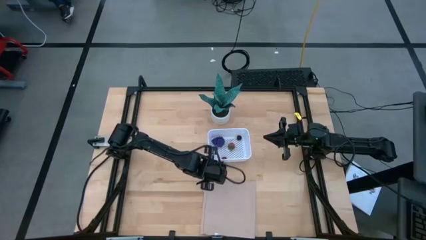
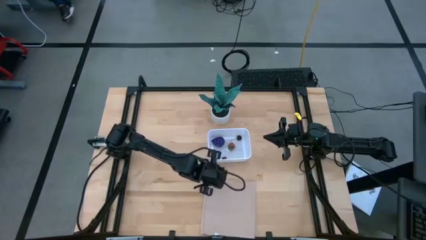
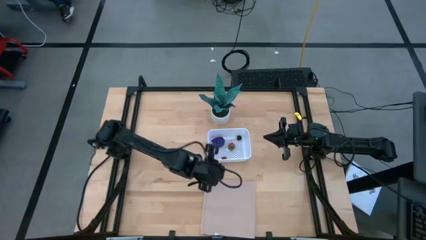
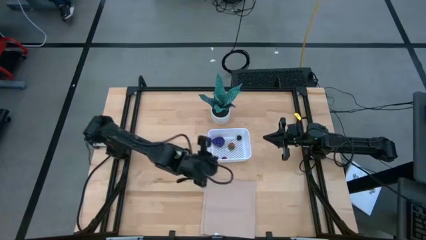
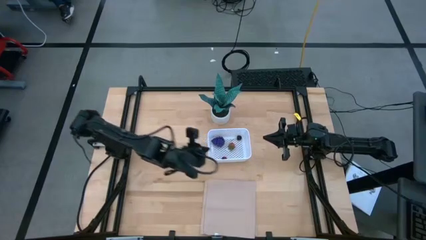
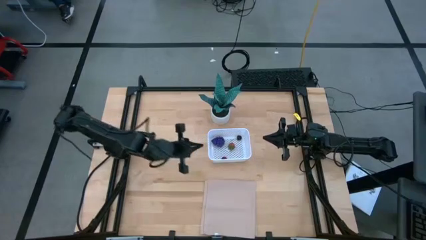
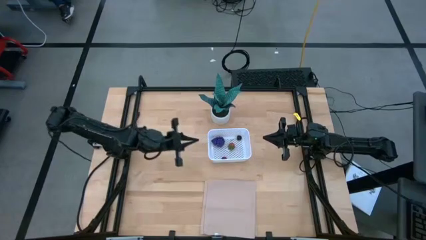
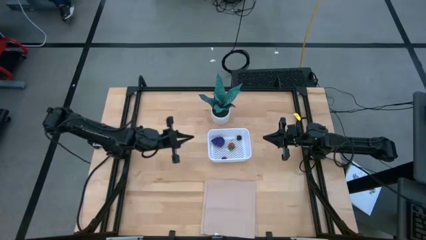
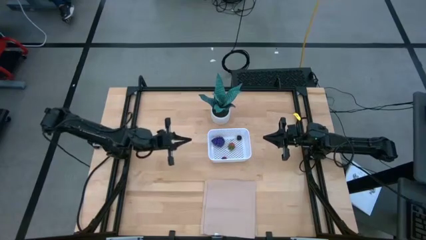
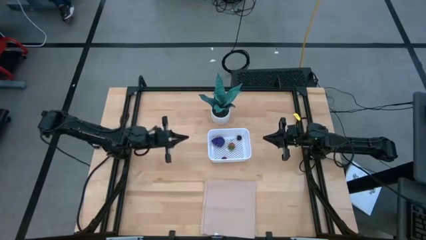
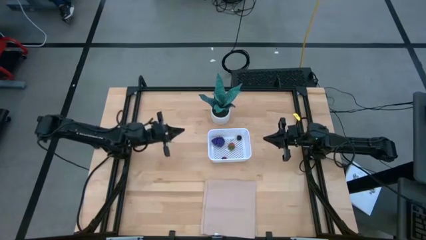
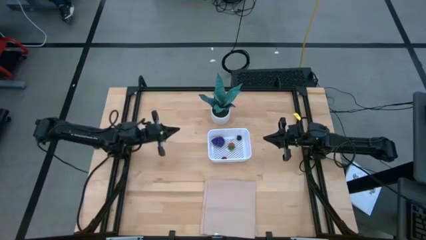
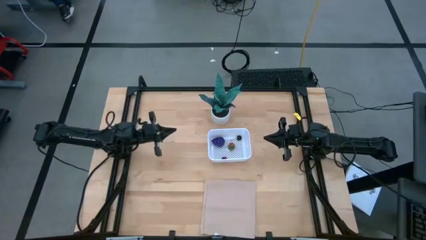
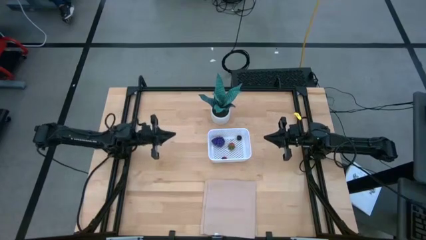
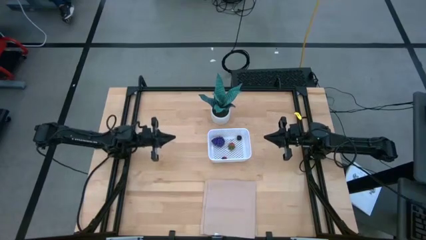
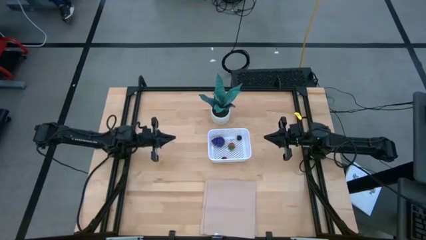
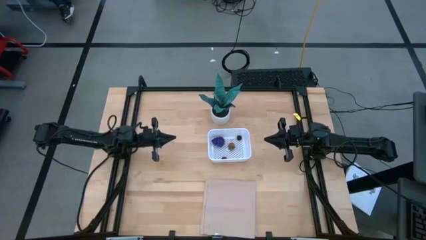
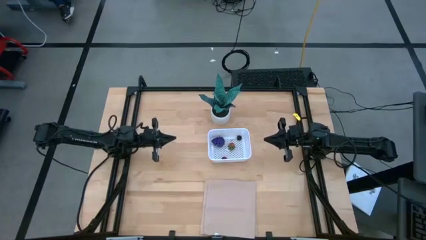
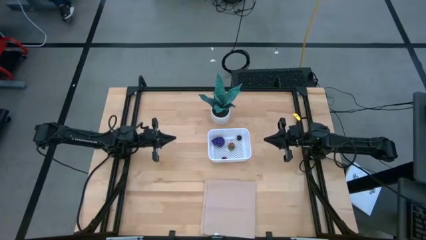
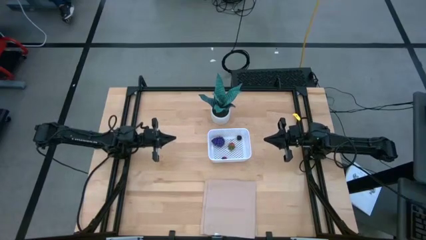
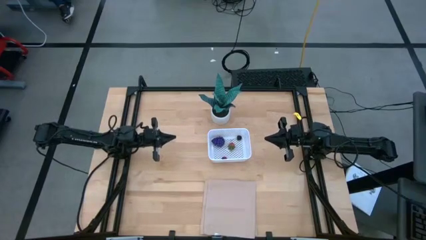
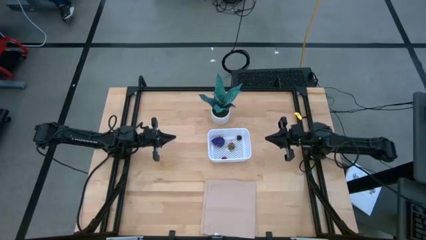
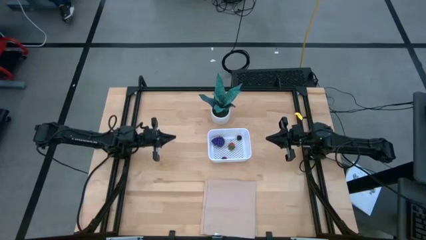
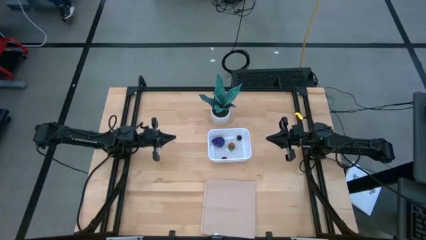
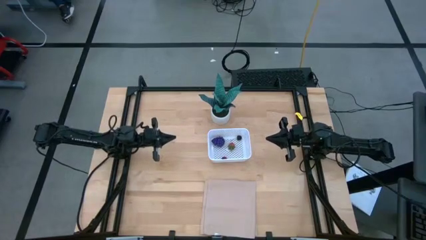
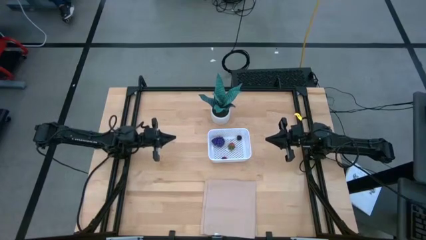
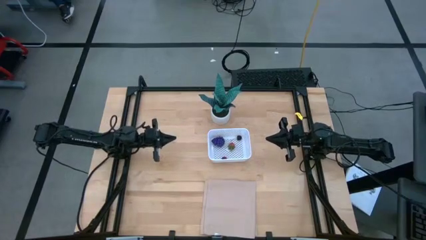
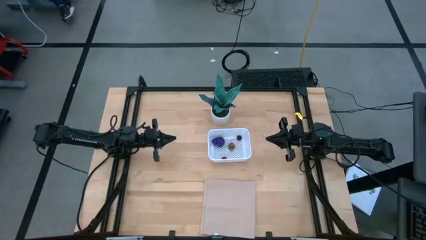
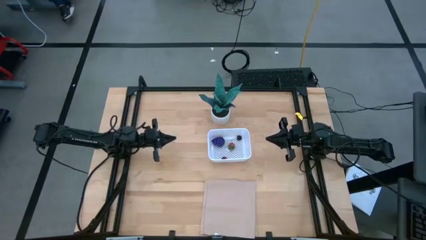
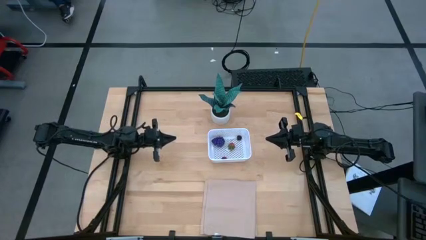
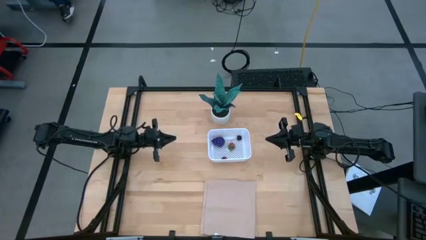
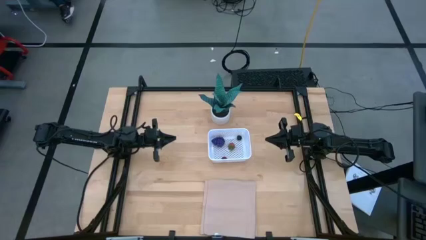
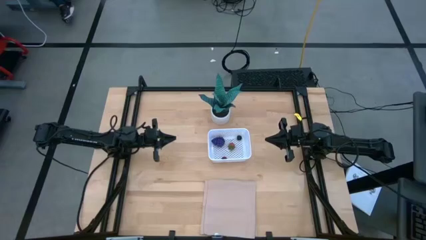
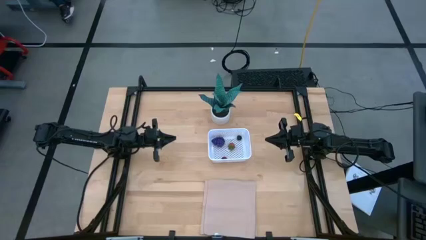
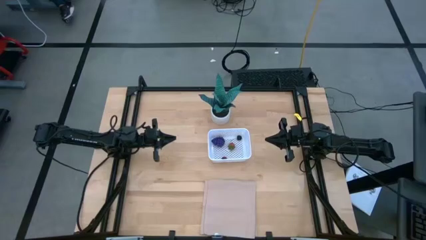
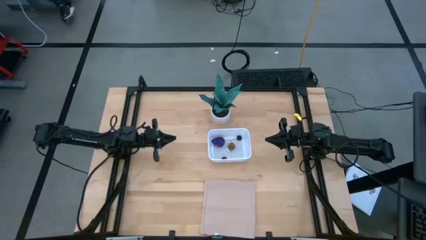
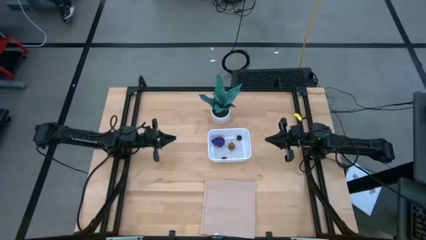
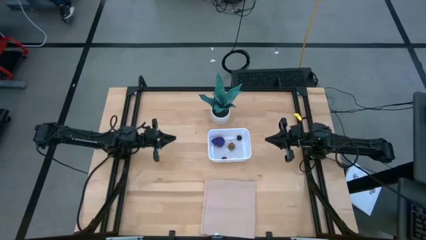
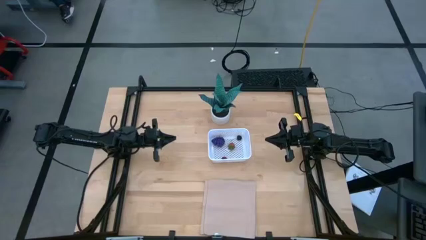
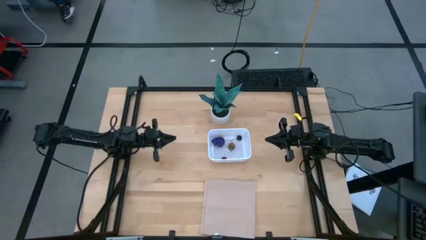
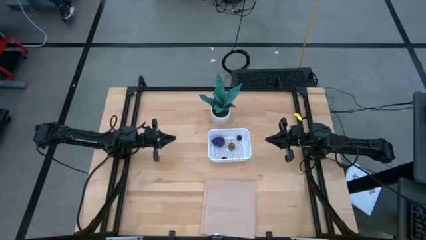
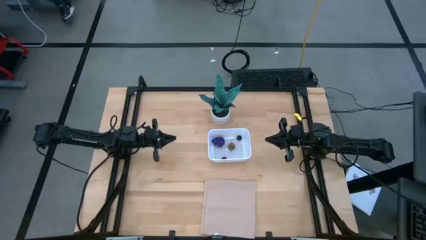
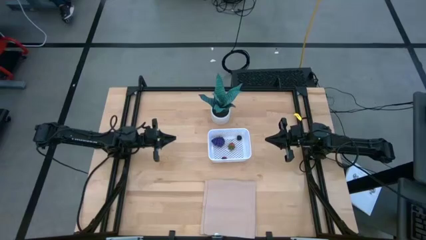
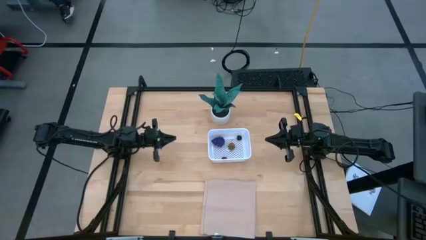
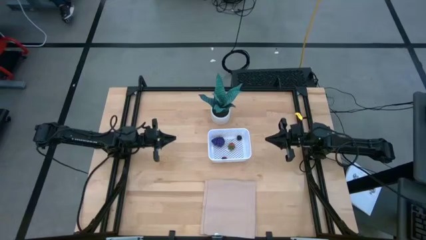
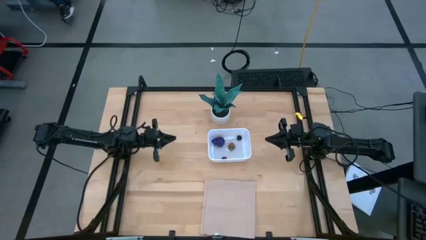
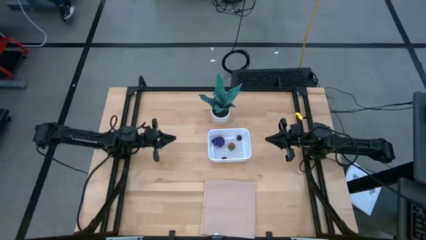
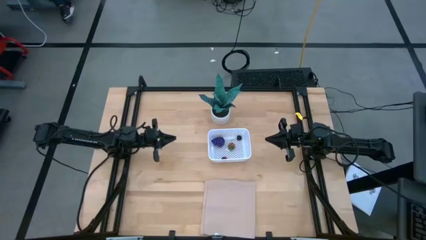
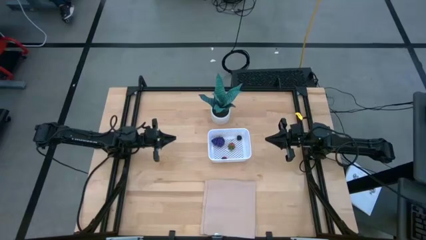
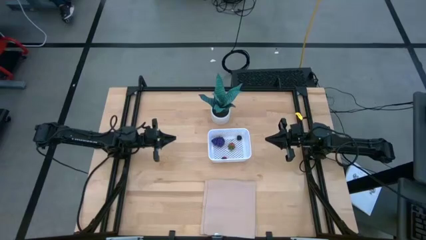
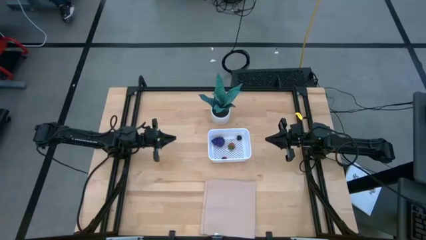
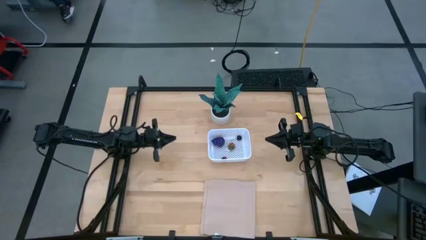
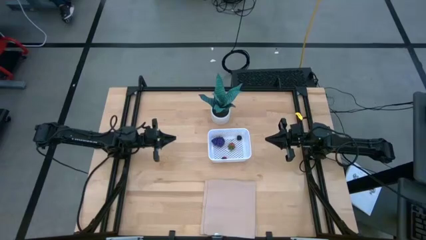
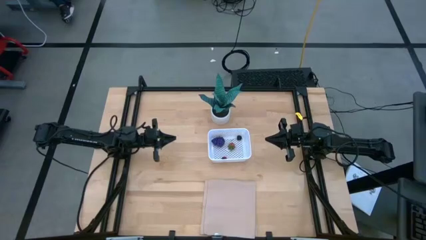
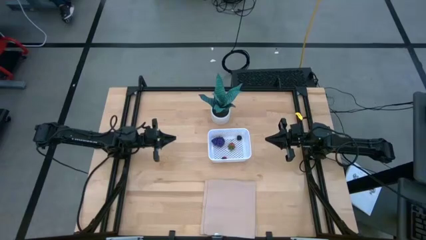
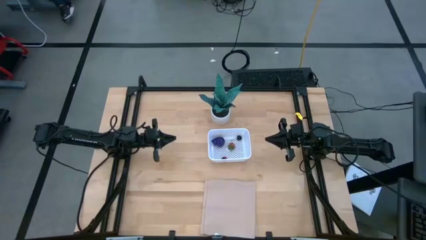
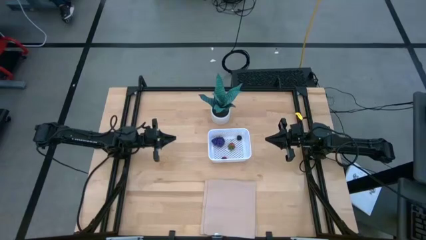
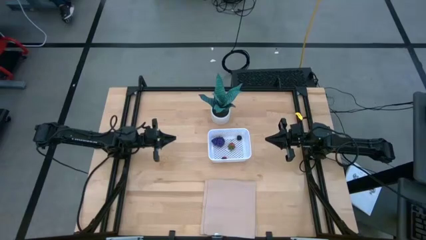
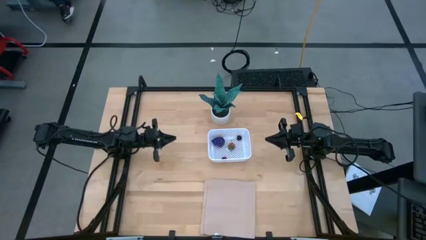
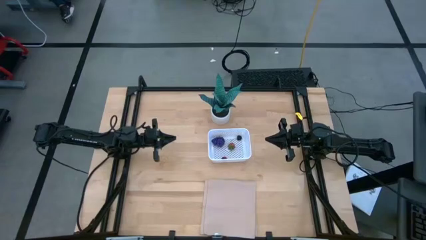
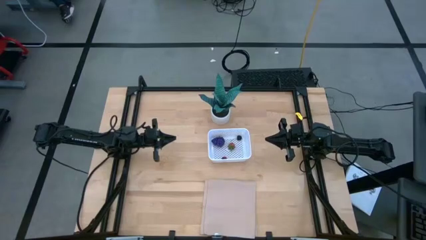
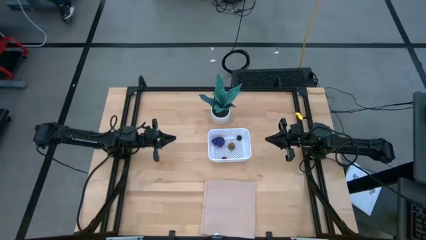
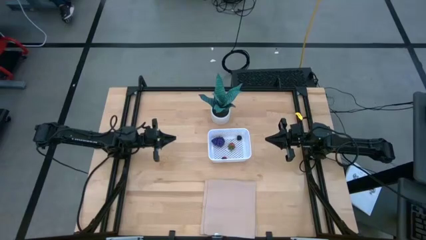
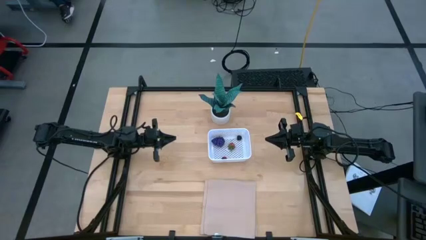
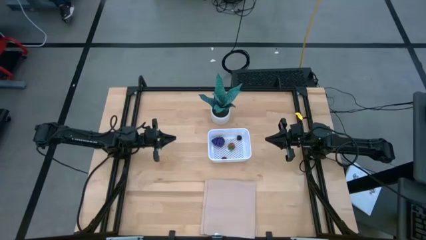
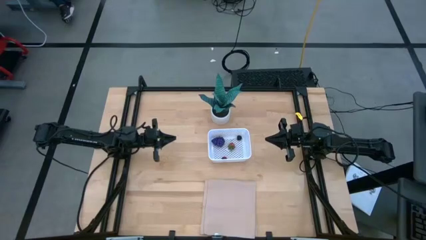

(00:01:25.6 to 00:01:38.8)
Task: Pick and placing Produce into tupperware
Return to Home Position
